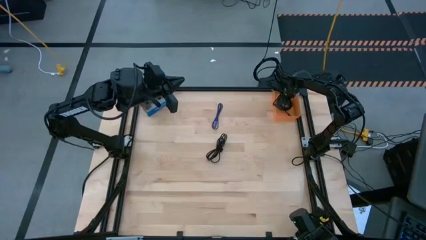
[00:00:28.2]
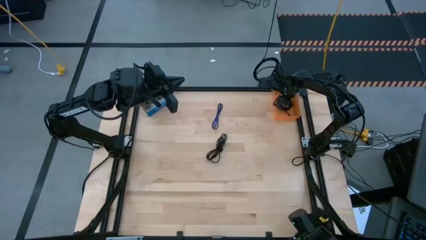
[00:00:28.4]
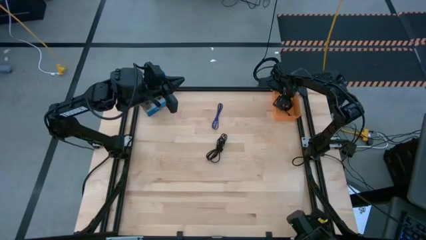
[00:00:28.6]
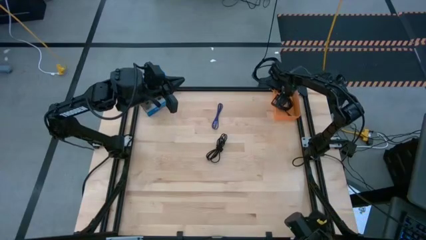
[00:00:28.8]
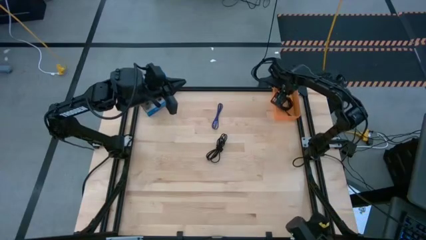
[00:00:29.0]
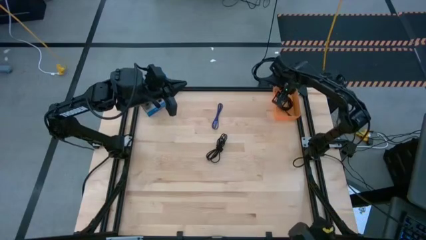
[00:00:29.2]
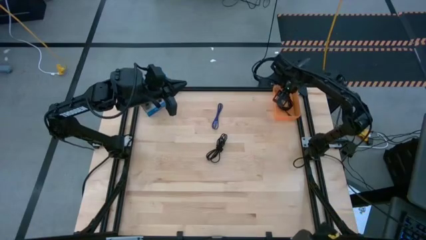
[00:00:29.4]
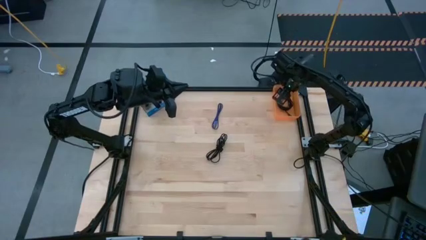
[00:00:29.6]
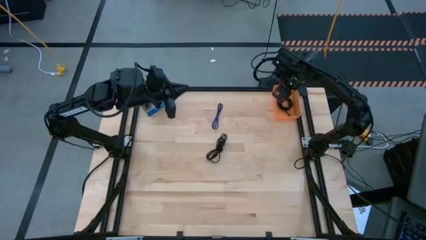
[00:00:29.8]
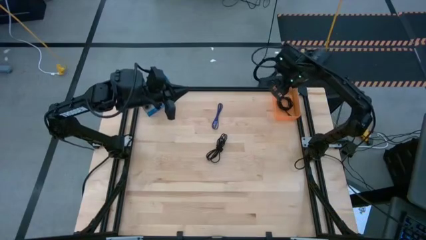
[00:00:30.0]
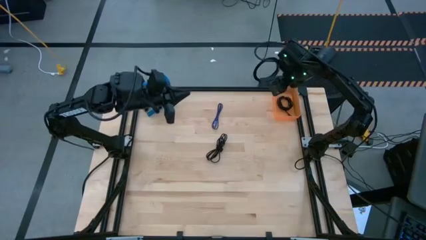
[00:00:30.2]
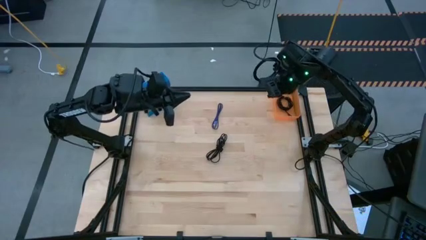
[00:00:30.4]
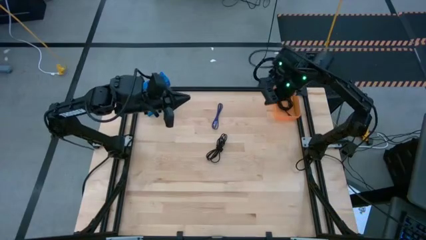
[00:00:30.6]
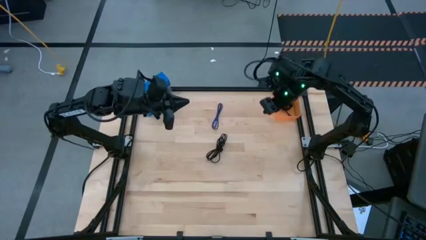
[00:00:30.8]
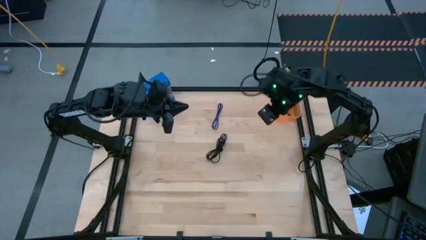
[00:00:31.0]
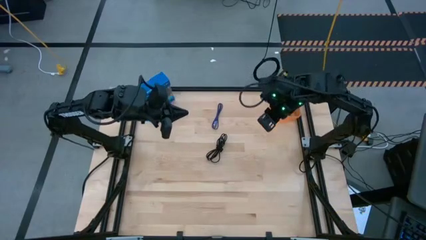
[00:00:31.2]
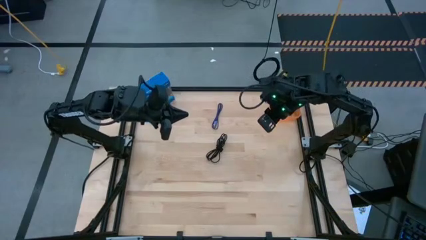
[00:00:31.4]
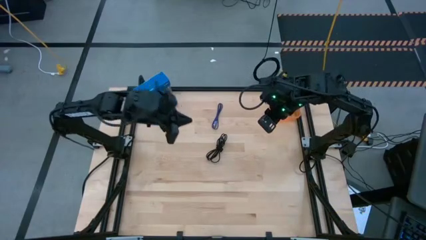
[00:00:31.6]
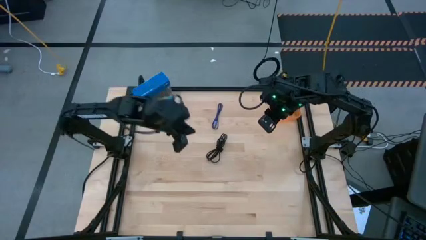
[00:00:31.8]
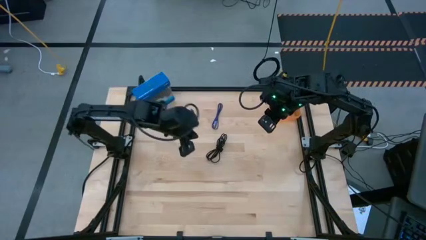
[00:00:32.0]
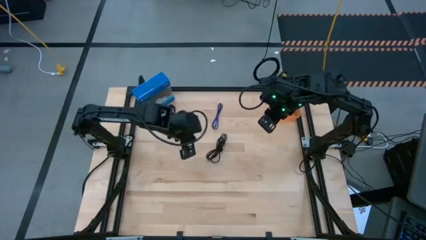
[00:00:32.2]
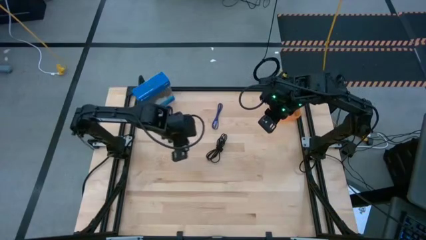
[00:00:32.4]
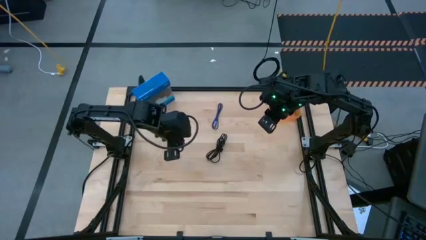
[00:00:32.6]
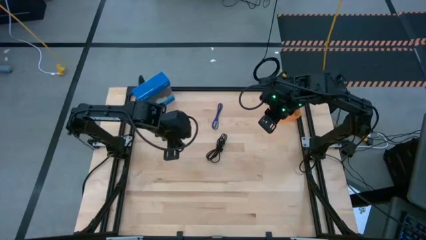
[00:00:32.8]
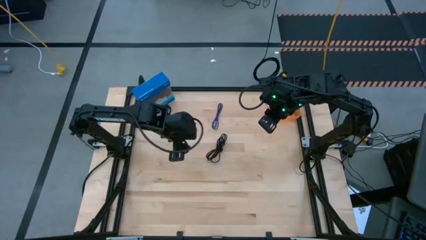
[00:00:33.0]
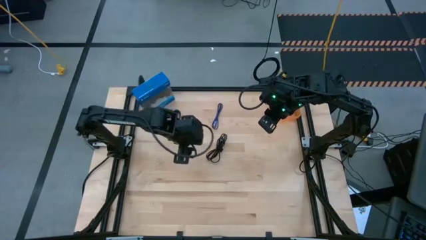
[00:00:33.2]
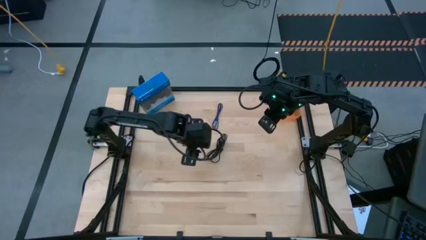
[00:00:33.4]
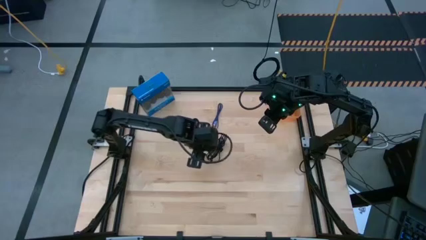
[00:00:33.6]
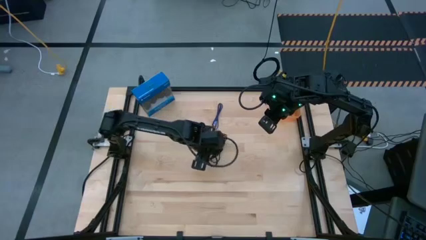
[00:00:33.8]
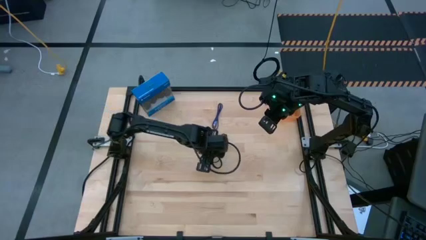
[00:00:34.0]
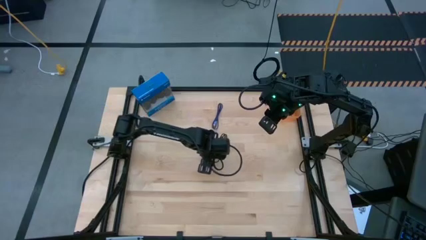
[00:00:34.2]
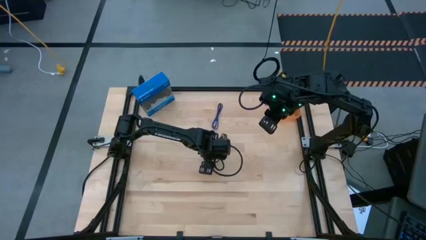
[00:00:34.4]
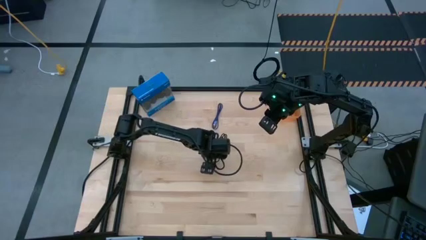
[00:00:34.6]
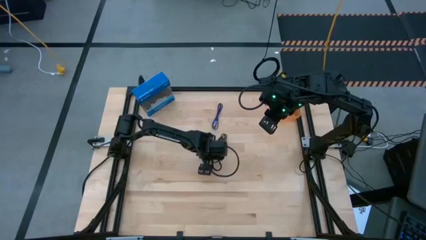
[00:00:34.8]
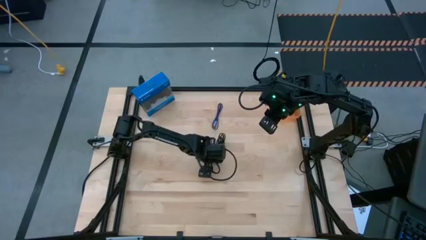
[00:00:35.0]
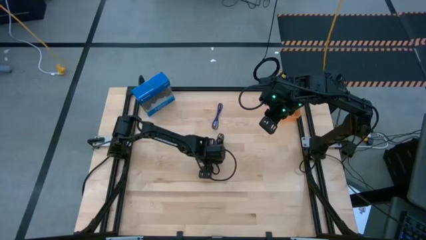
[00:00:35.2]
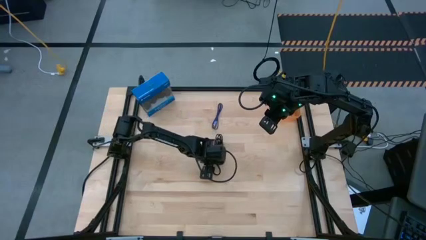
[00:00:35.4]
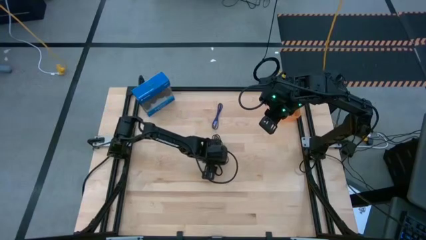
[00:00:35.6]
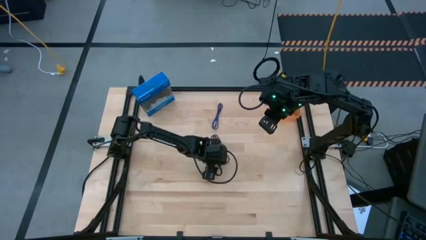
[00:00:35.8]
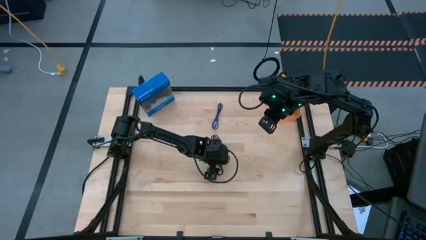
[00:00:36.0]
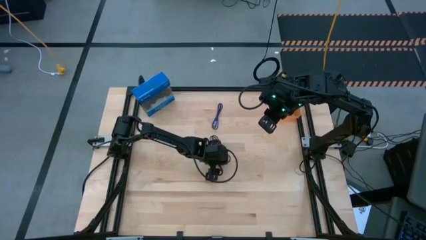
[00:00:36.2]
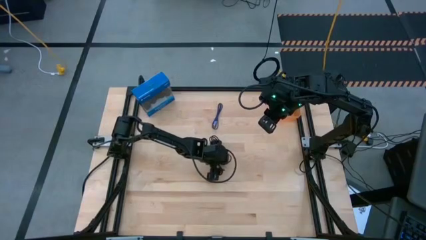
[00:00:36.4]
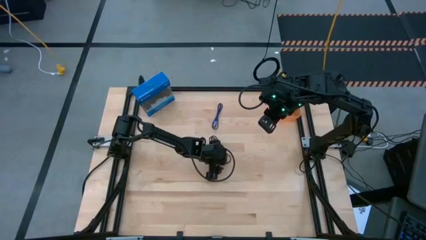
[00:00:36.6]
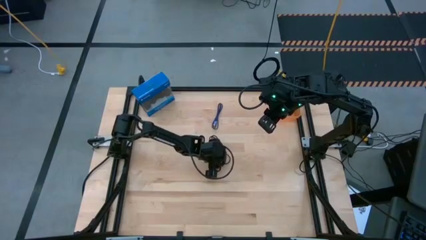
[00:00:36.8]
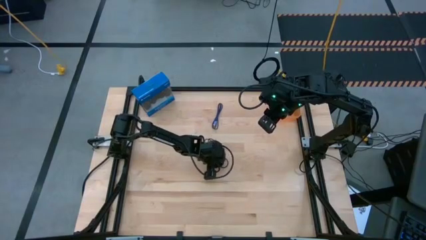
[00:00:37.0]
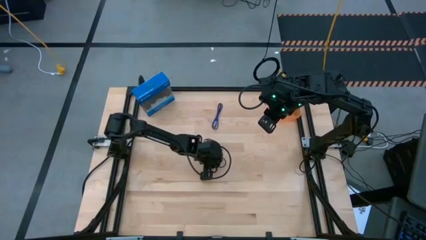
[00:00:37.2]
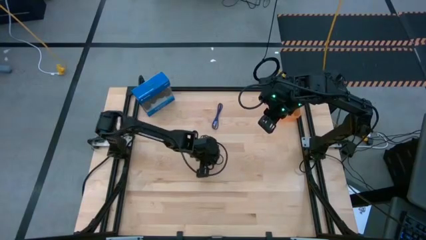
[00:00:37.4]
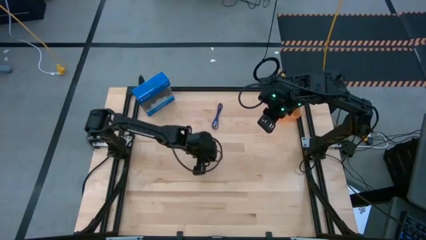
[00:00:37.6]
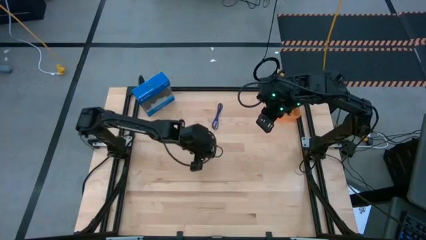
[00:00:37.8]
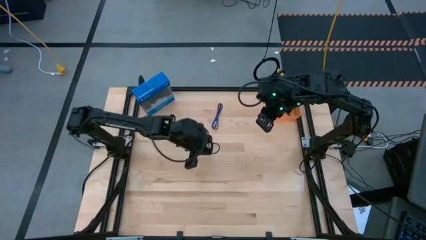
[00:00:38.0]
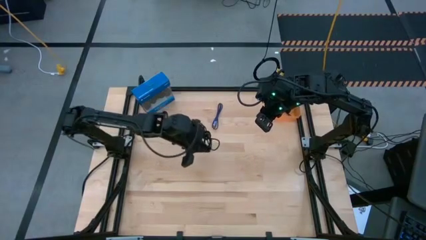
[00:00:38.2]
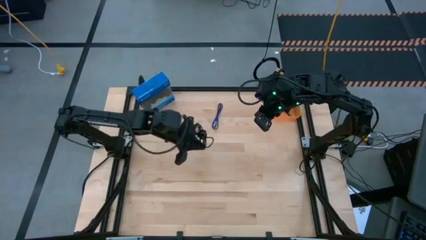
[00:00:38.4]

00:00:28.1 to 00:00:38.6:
Task: Pick and place USB-C Cables
Put the black charger cable into the orange bin
